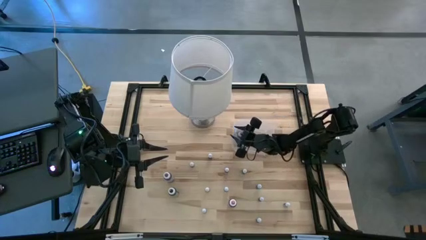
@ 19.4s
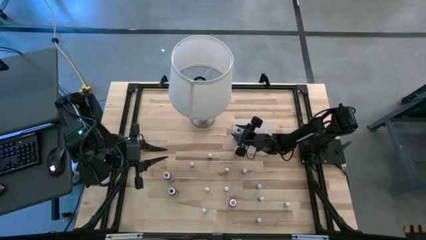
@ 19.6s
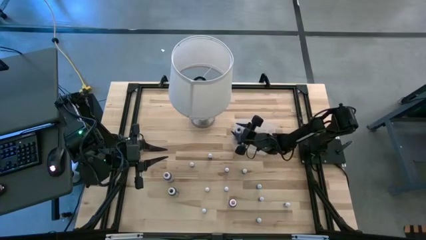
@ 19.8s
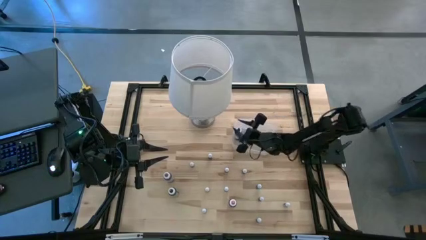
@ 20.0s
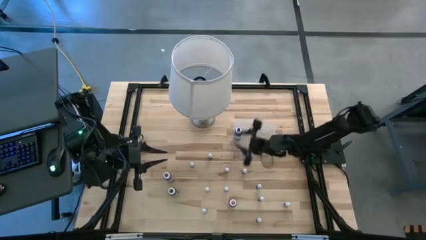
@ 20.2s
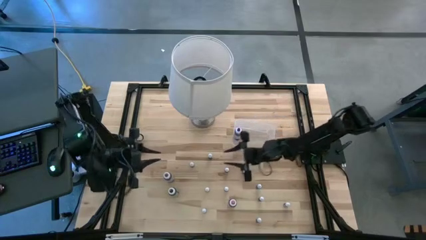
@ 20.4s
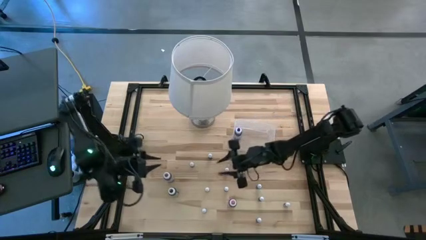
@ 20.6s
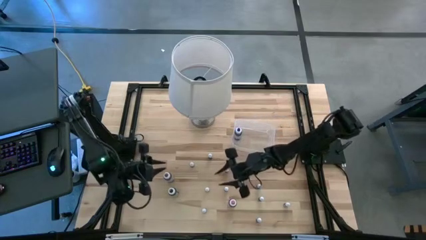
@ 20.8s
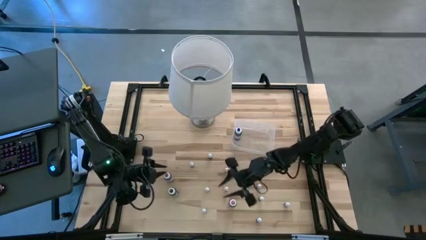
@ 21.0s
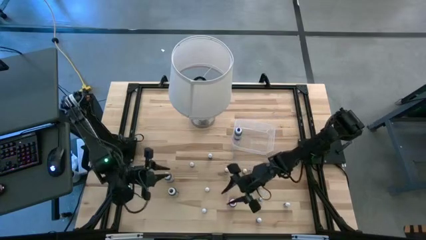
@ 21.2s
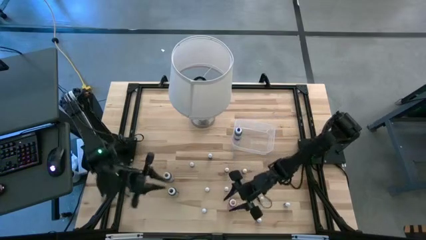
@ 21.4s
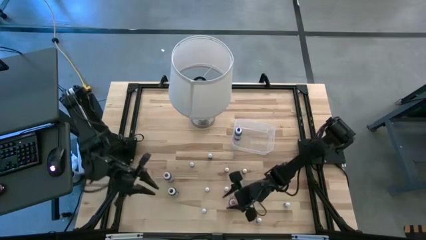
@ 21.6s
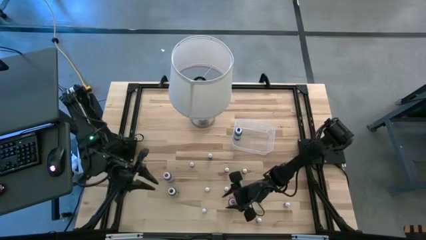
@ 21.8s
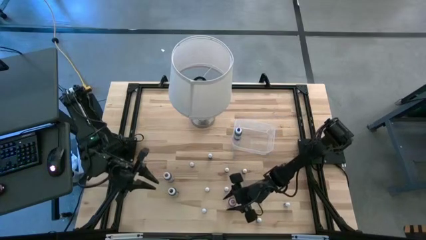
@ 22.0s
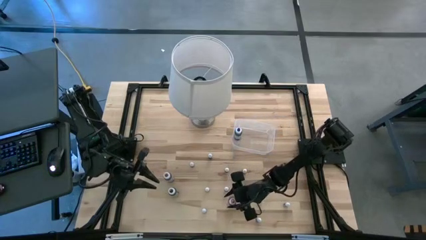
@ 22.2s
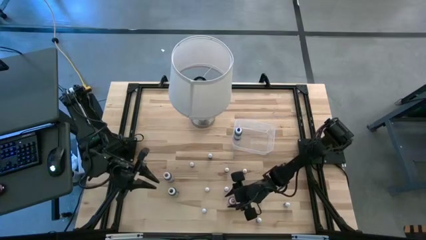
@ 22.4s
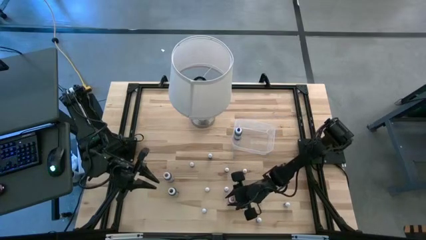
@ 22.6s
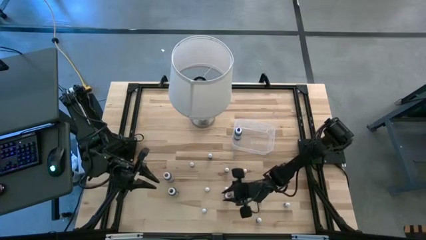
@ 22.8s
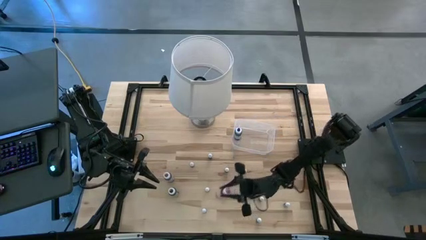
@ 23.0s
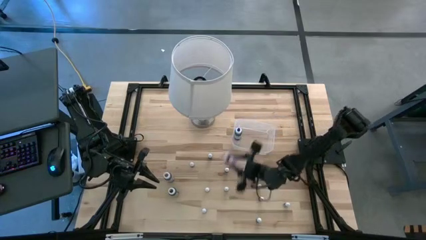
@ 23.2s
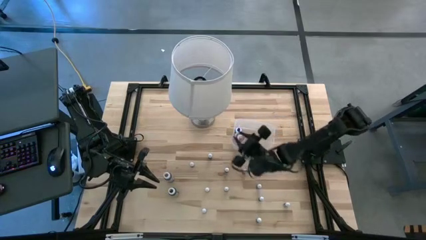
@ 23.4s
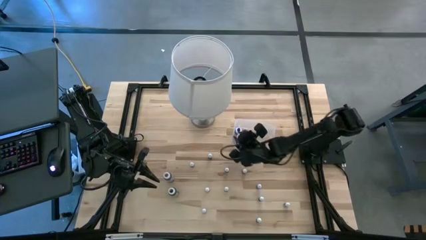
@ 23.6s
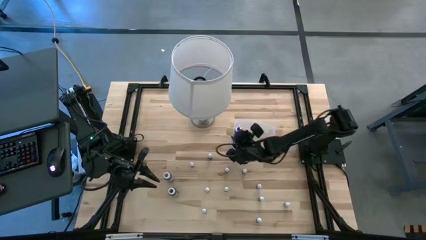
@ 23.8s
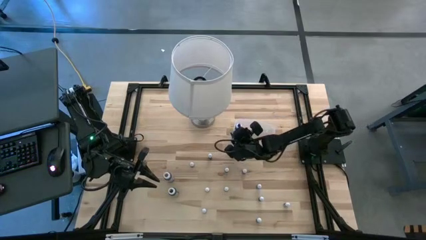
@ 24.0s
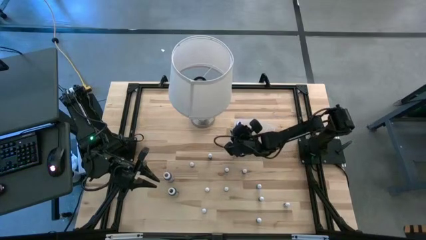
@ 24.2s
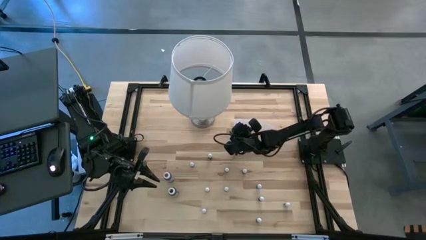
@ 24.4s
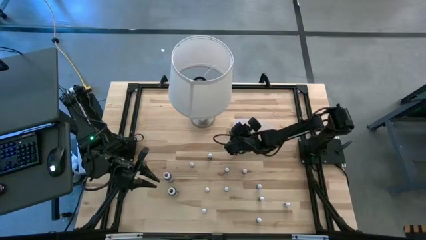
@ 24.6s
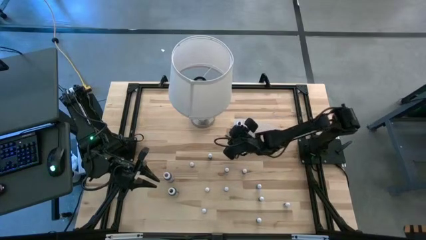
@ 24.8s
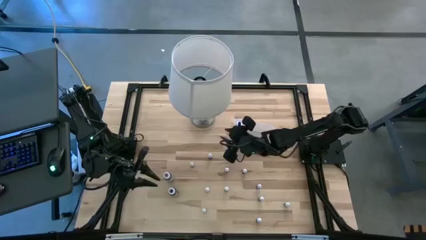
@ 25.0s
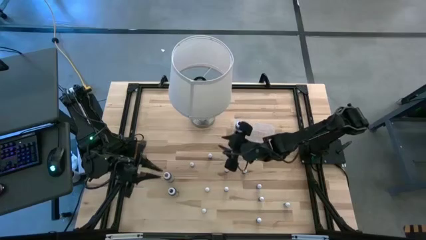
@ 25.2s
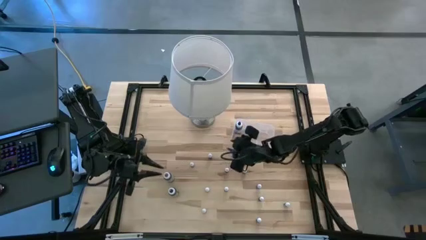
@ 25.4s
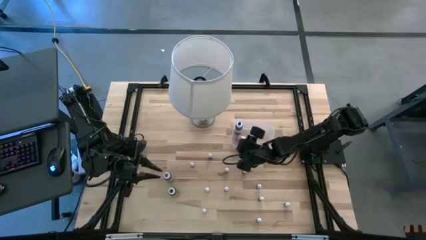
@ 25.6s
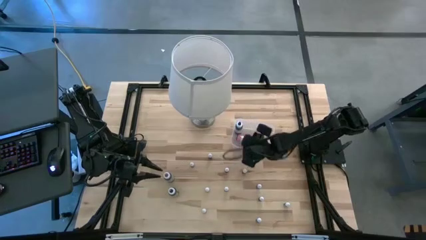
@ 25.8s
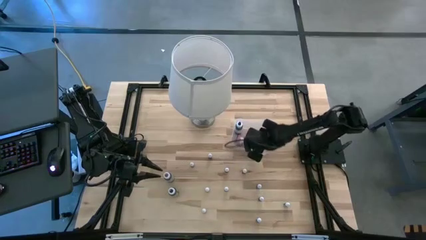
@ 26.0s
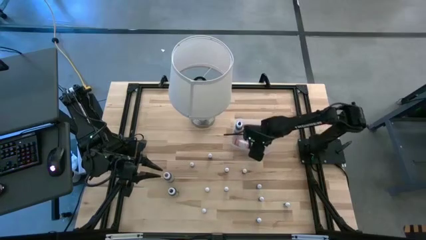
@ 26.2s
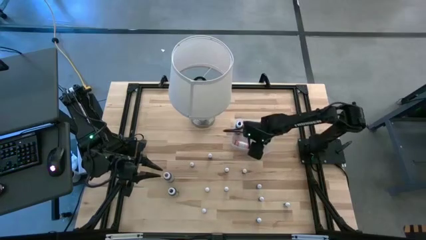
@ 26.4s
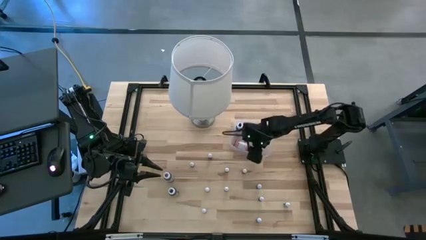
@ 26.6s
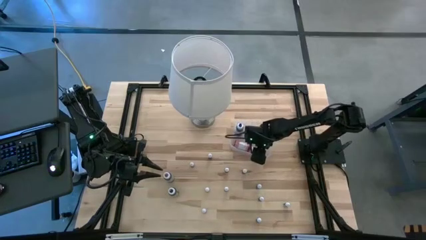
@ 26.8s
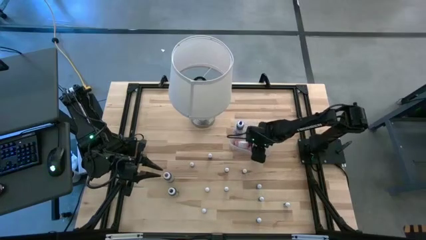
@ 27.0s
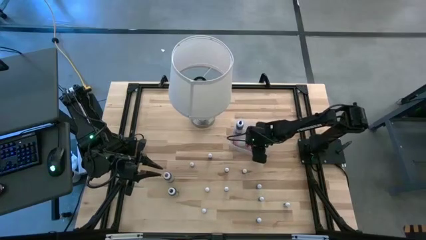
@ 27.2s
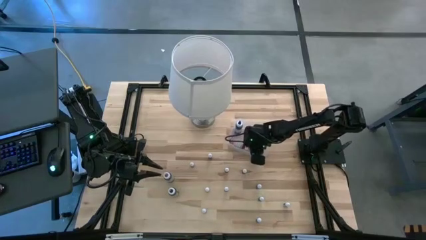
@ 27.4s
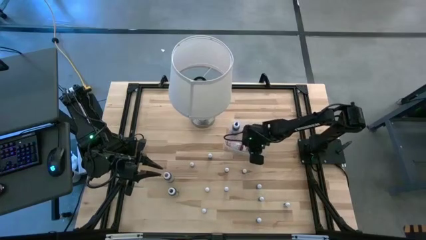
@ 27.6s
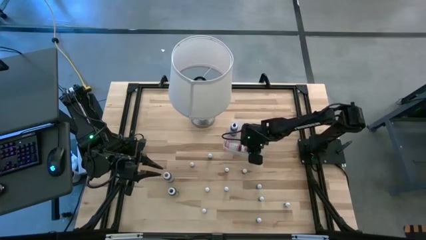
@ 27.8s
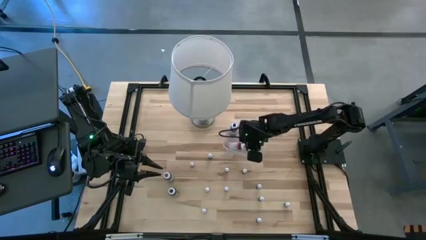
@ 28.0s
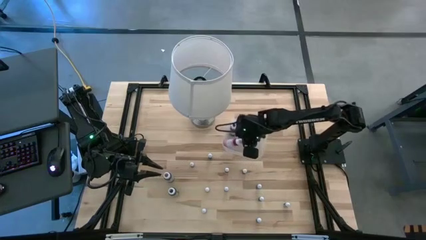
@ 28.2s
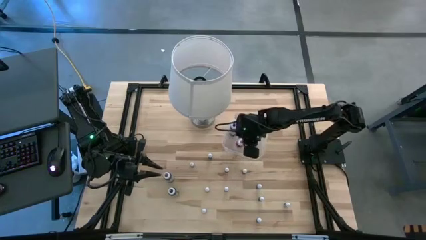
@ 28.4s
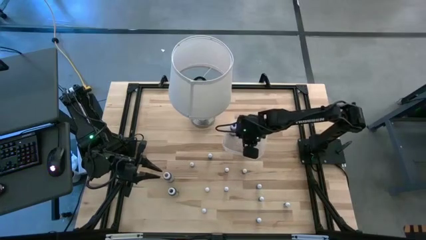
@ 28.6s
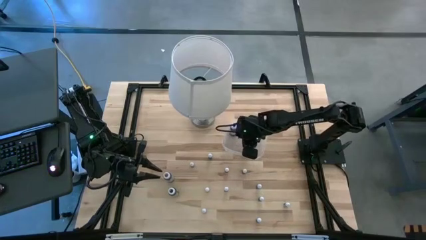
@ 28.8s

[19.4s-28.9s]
Task: Pick & Place food coloring
Put the large pink food coloring bottle into the transparent bin

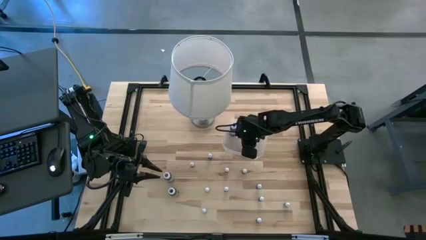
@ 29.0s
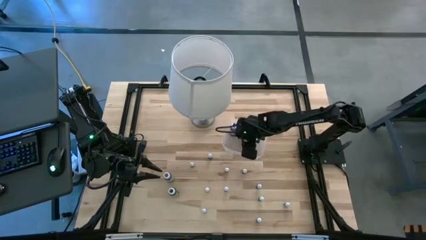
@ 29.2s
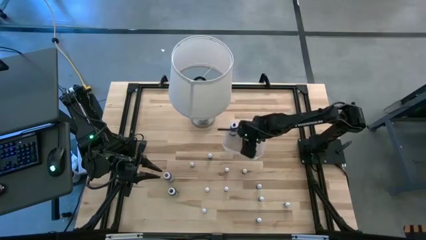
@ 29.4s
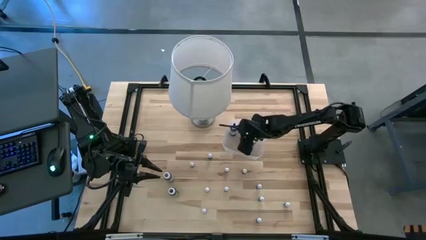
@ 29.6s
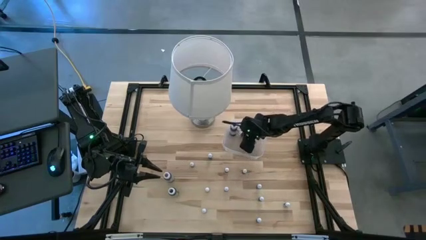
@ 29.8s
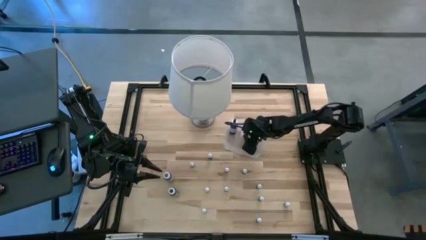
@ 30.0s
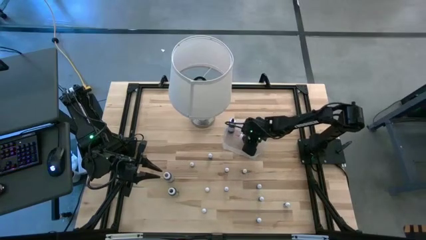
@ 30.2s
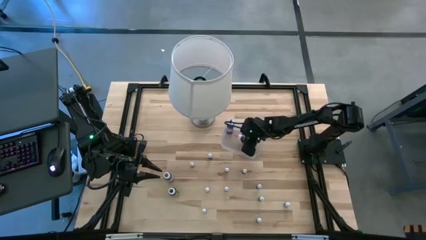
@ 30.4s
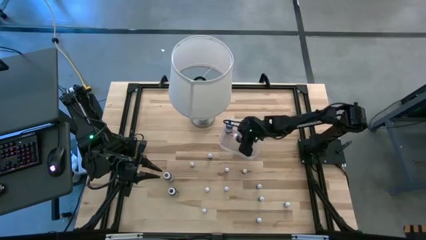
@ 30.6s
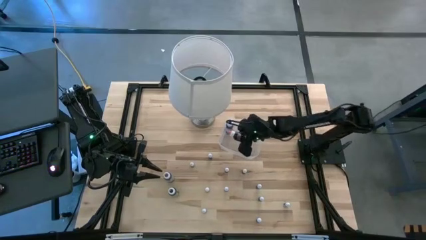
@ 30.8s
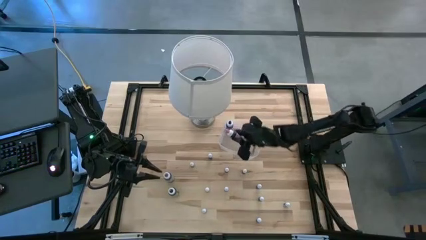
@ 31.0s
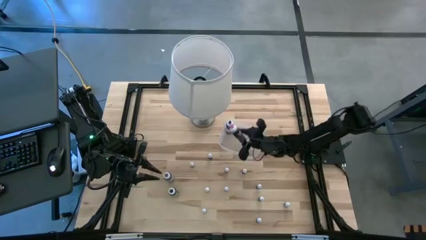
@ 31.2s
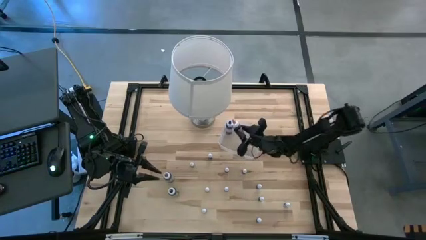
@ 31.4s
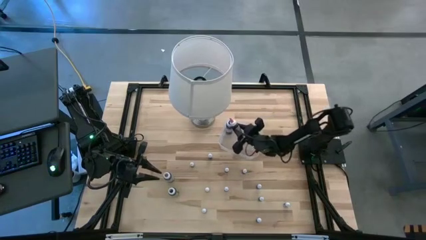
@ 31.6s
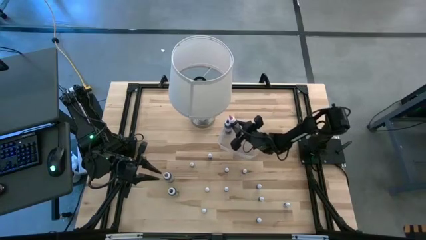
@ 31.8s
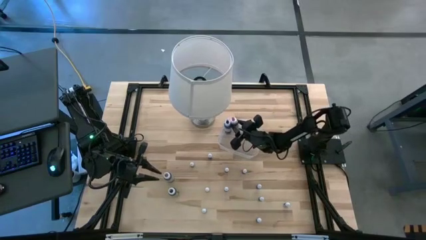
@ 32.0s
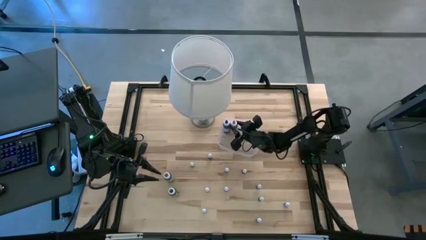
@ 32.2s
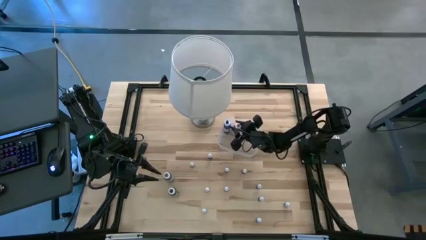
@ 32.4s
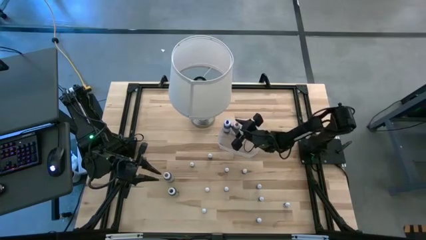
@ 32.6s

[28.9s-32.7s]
Put the large pink food coloring bottle into the transparent bin

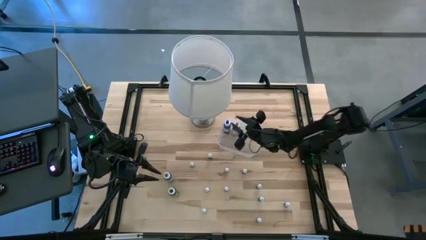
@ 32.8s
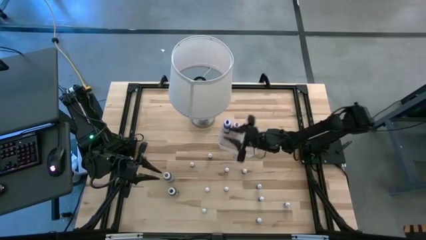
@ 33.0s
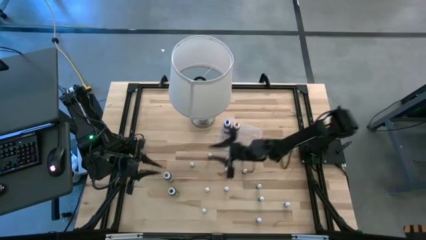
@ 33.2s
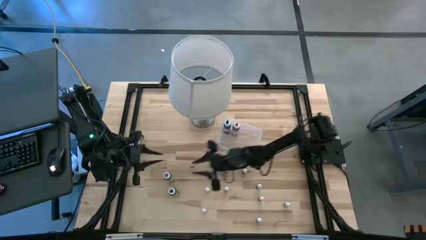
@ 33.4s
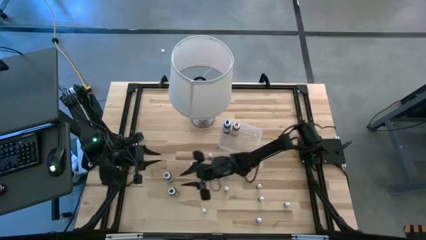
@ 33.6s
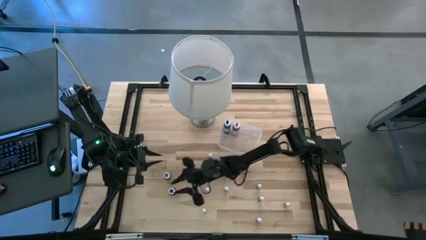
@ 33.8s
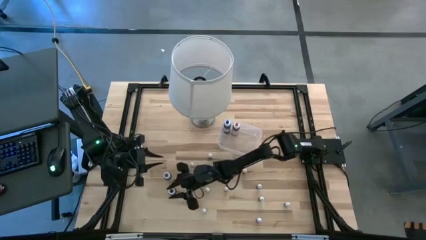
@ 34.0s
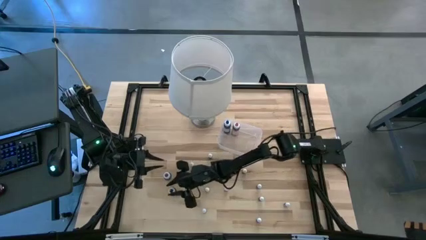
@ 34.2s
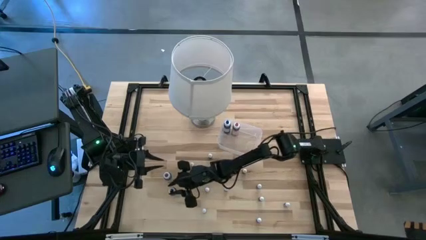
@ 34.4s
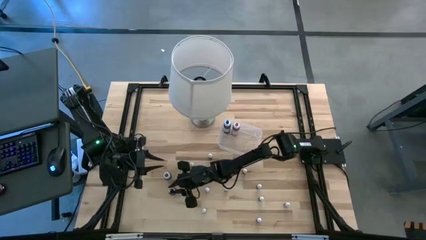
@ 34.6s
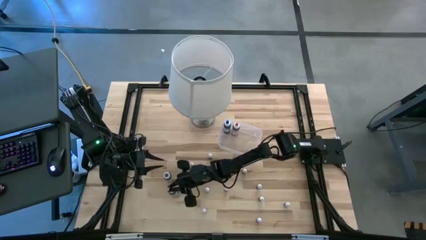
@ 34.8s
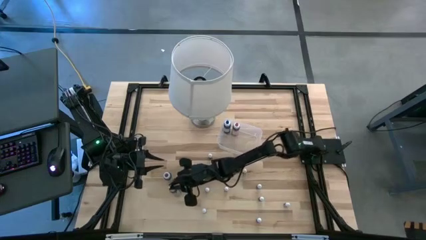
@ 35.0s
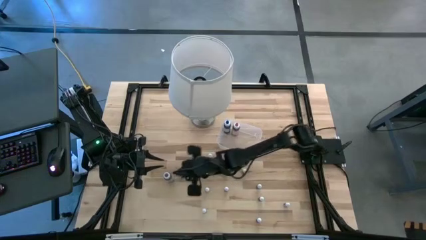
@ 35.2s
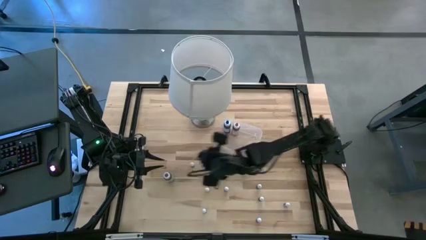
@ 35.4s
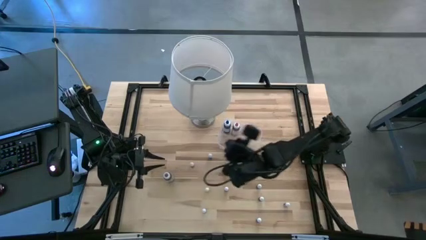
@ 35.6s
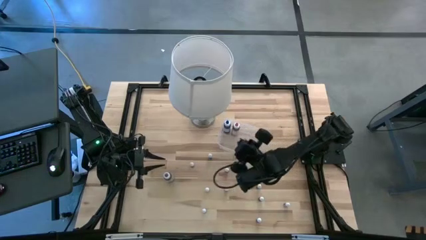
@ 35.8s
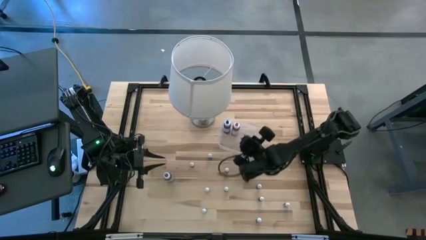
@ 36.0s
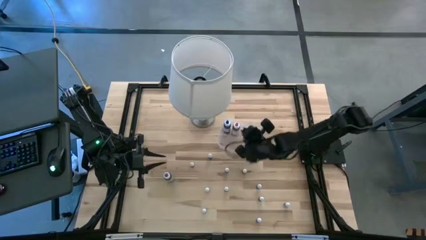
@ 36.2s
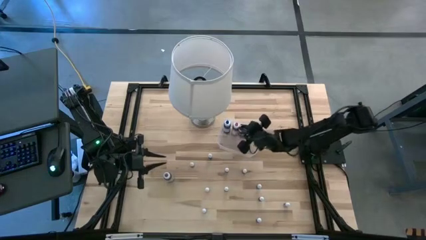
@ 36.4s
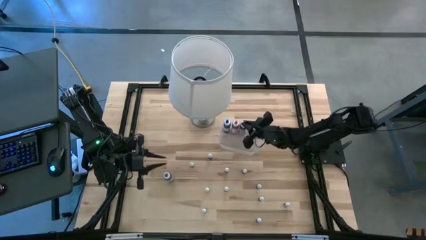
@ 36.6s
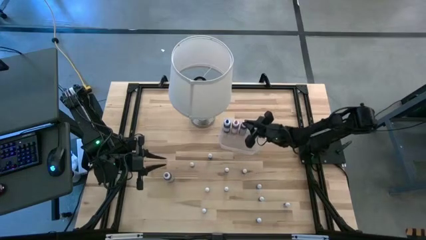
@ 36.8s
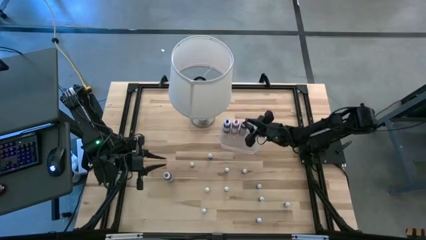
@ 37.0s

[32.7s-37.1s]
Put the large black food coloring bottle into the transparent bin
